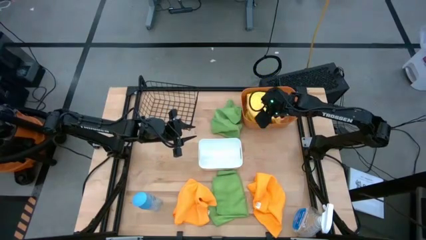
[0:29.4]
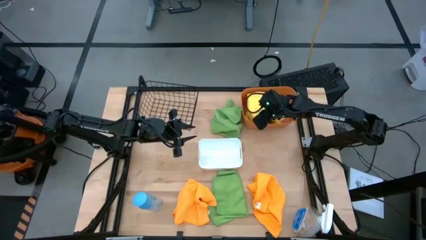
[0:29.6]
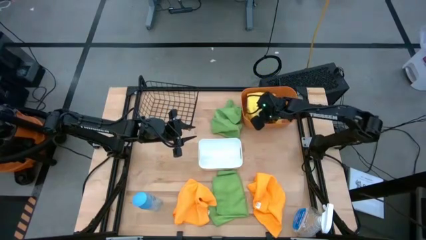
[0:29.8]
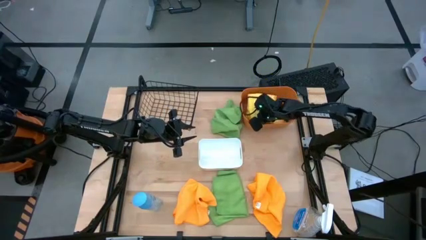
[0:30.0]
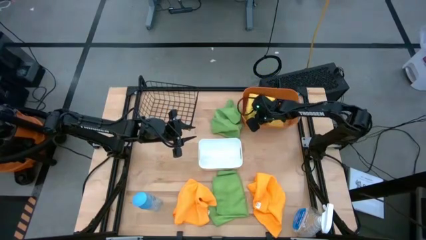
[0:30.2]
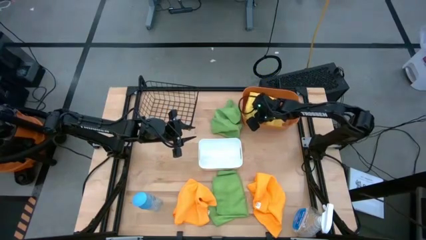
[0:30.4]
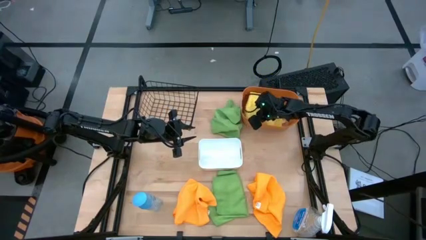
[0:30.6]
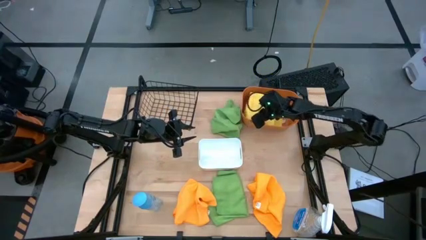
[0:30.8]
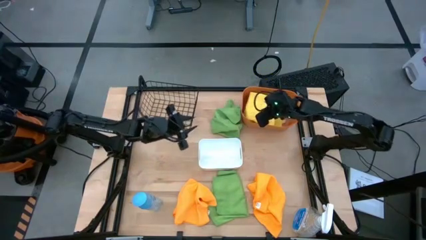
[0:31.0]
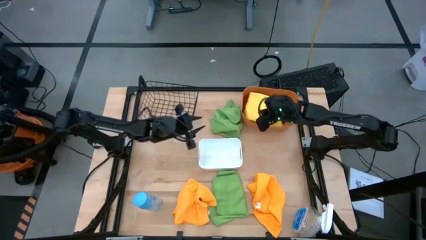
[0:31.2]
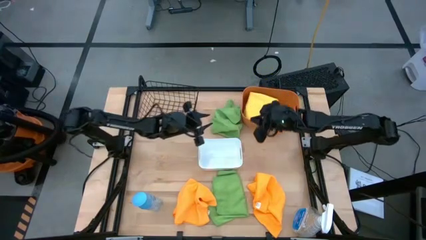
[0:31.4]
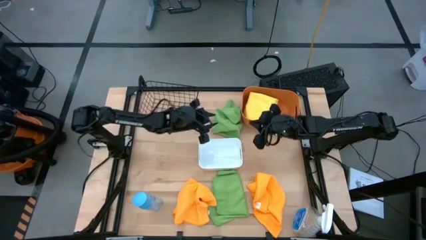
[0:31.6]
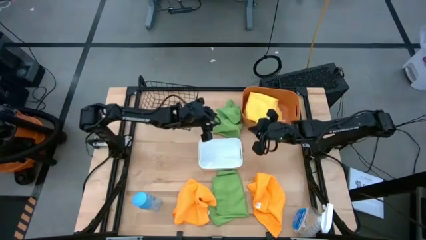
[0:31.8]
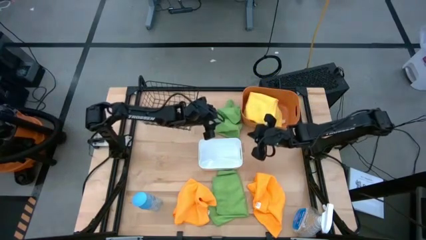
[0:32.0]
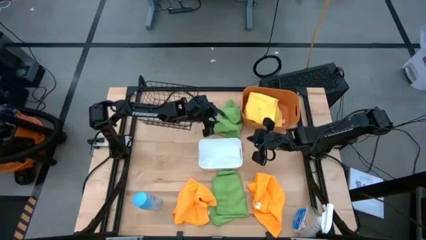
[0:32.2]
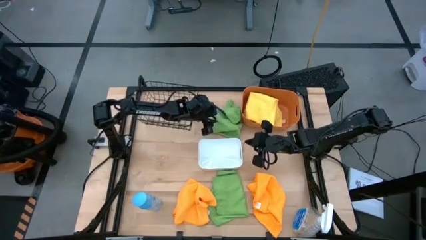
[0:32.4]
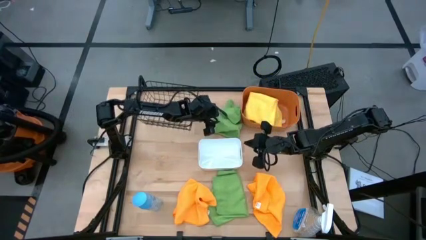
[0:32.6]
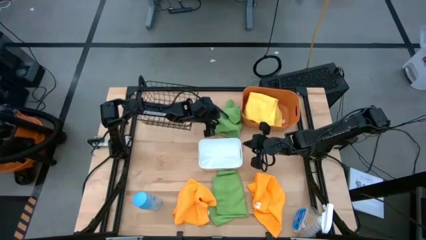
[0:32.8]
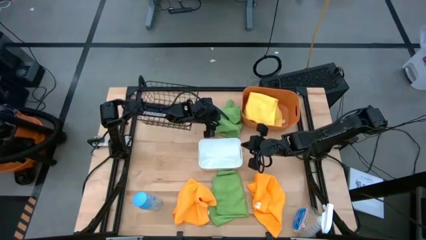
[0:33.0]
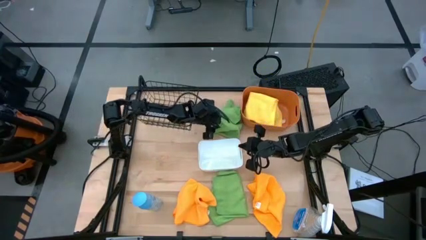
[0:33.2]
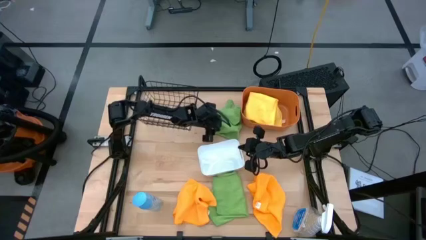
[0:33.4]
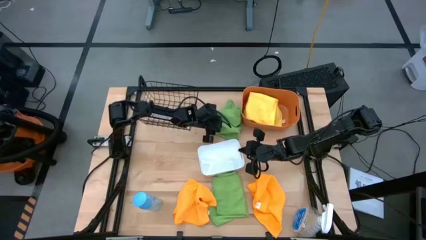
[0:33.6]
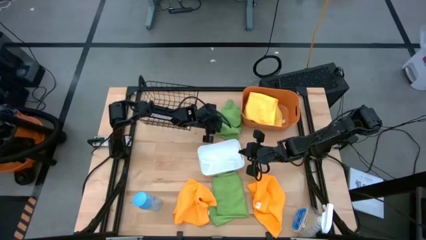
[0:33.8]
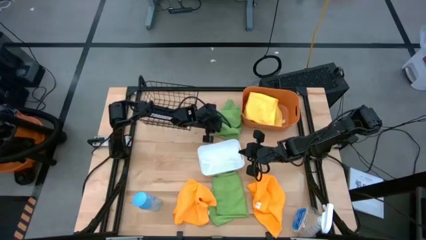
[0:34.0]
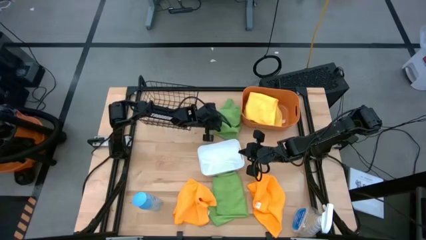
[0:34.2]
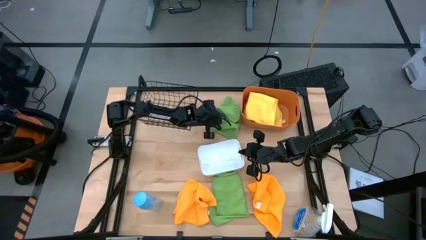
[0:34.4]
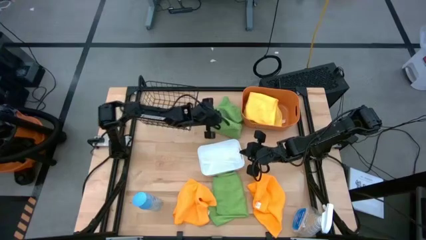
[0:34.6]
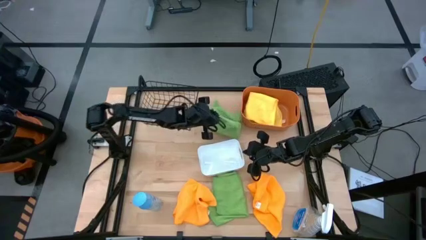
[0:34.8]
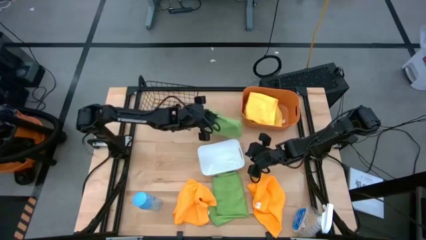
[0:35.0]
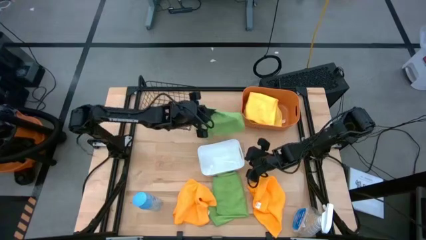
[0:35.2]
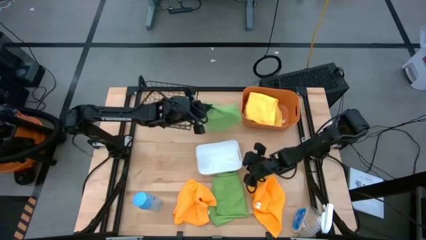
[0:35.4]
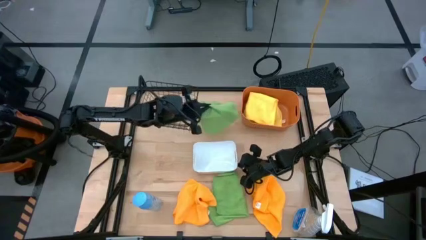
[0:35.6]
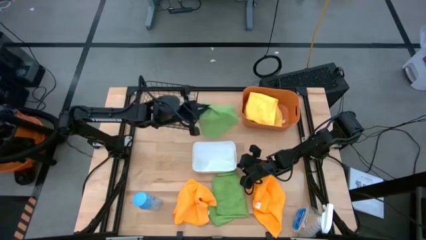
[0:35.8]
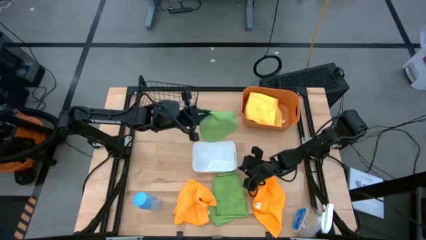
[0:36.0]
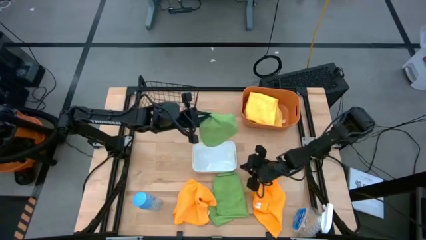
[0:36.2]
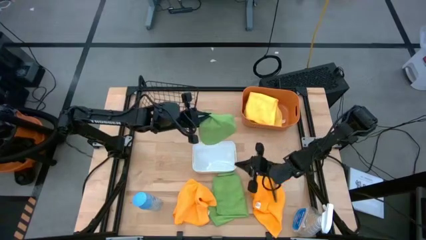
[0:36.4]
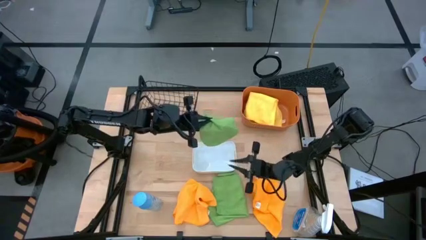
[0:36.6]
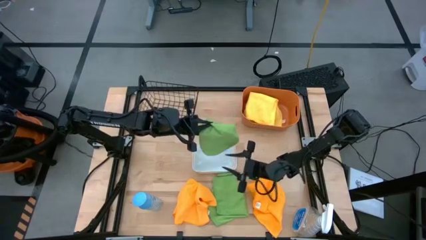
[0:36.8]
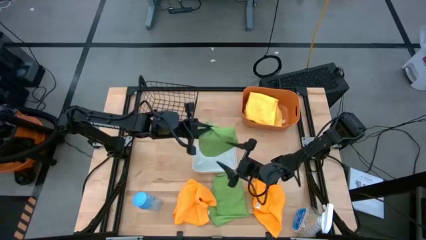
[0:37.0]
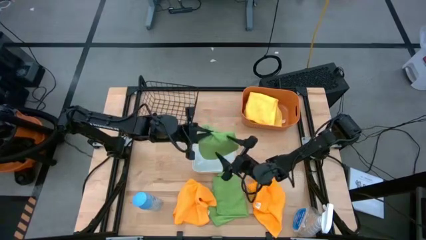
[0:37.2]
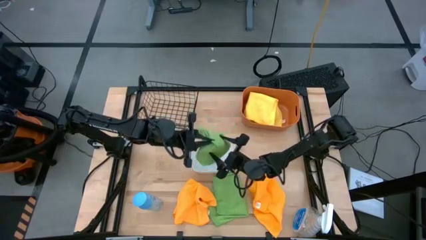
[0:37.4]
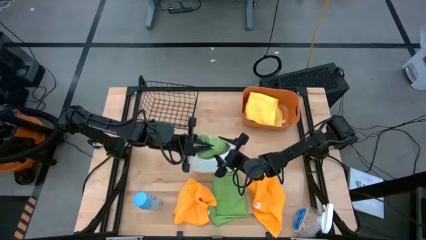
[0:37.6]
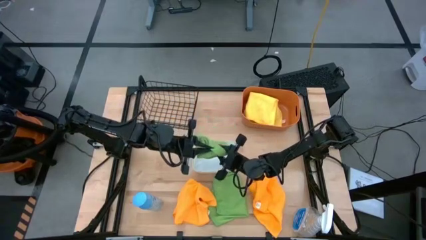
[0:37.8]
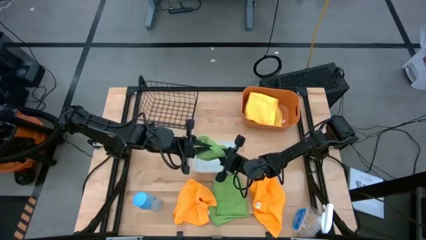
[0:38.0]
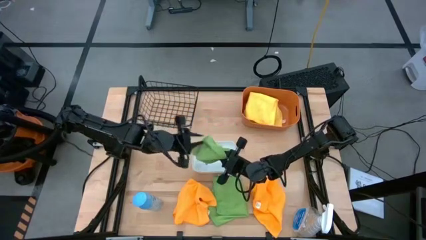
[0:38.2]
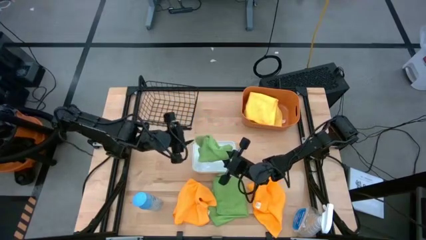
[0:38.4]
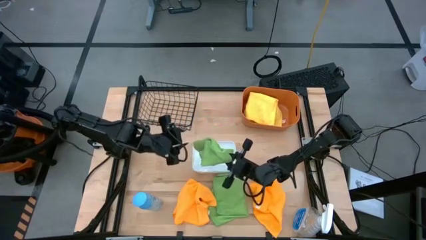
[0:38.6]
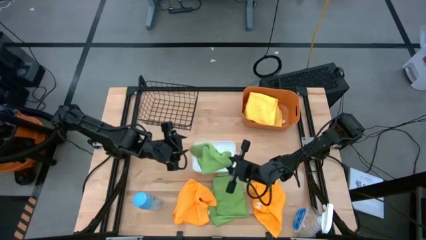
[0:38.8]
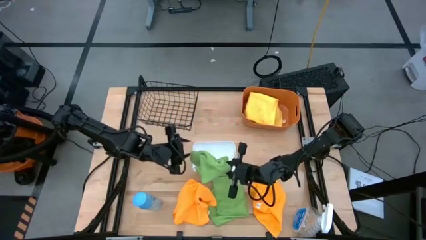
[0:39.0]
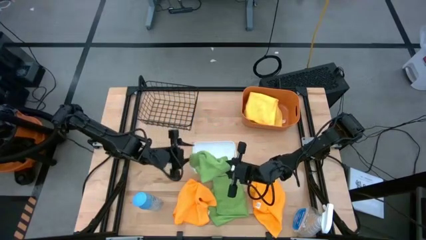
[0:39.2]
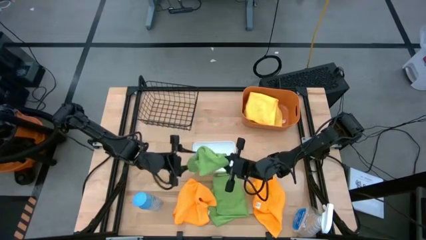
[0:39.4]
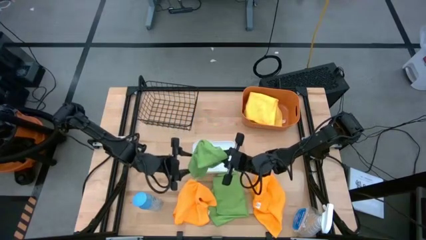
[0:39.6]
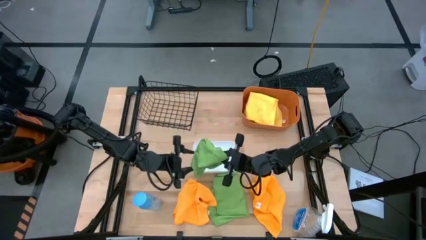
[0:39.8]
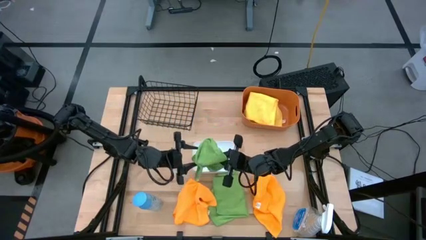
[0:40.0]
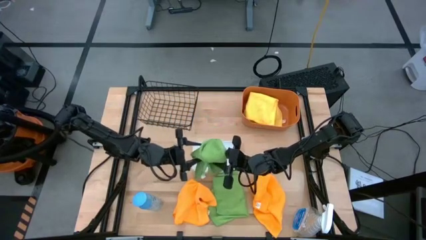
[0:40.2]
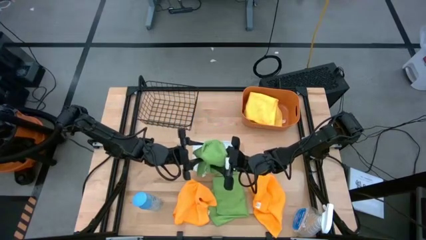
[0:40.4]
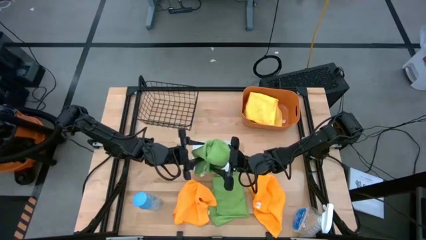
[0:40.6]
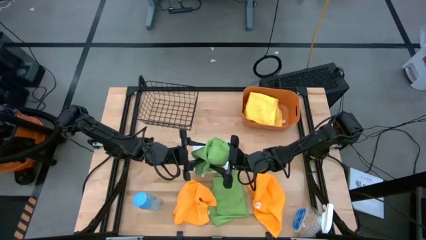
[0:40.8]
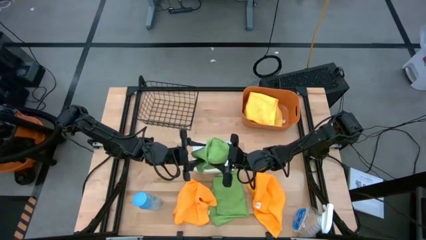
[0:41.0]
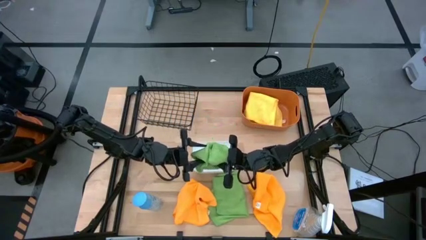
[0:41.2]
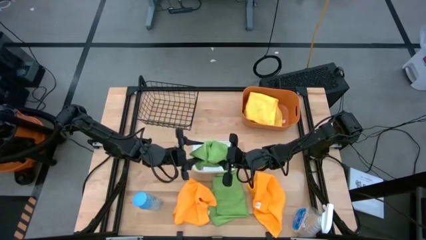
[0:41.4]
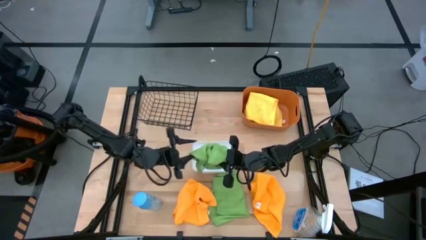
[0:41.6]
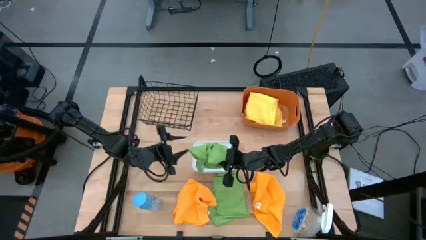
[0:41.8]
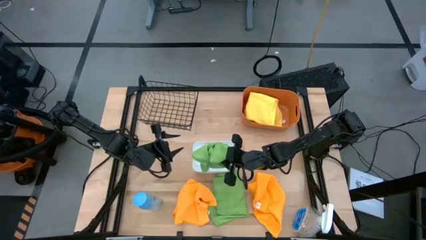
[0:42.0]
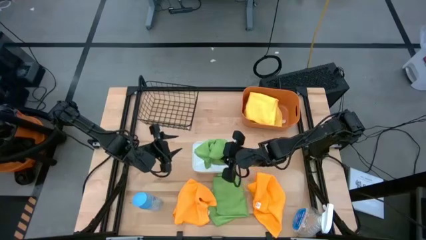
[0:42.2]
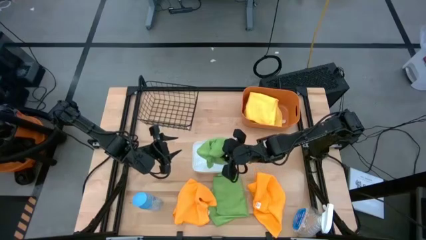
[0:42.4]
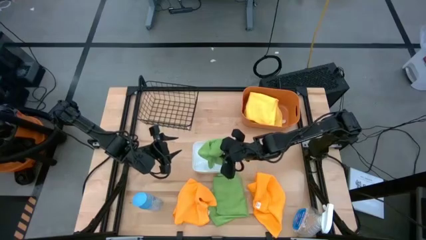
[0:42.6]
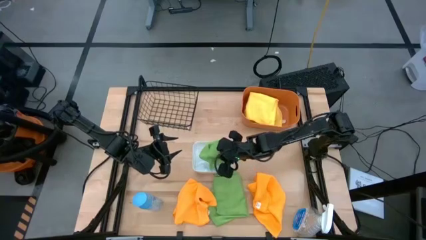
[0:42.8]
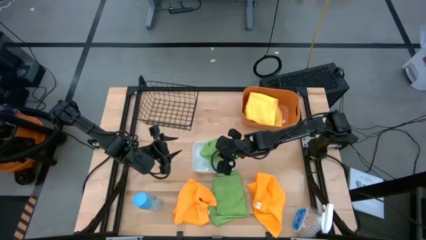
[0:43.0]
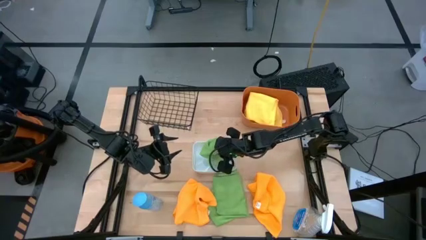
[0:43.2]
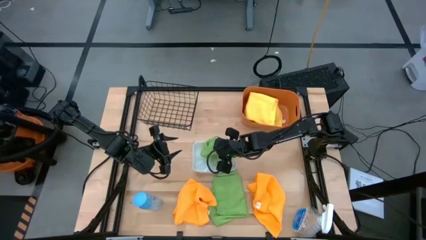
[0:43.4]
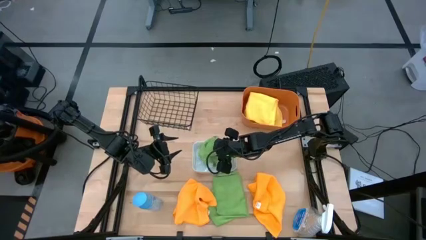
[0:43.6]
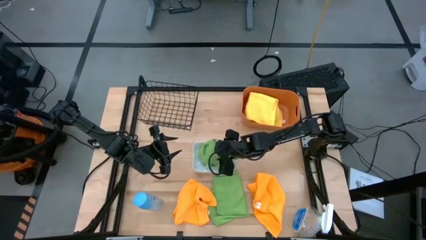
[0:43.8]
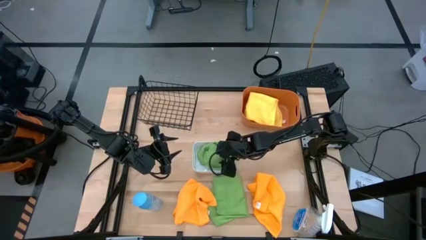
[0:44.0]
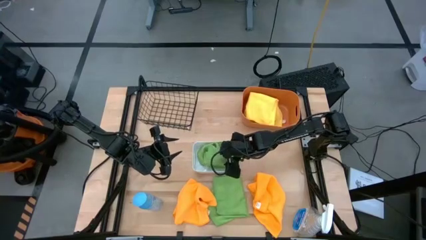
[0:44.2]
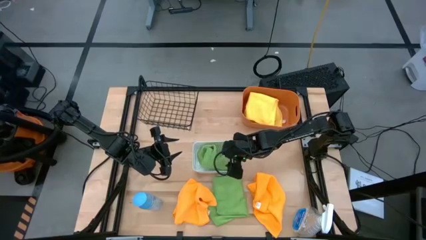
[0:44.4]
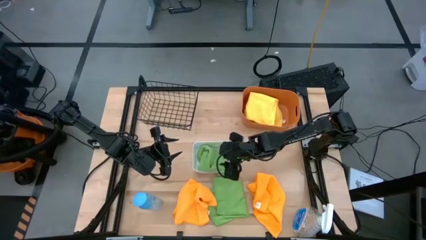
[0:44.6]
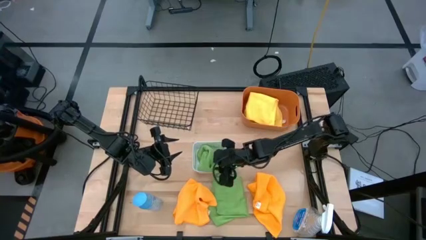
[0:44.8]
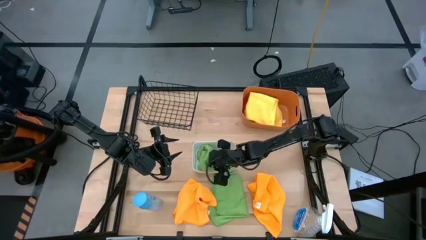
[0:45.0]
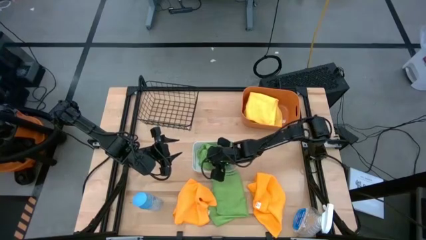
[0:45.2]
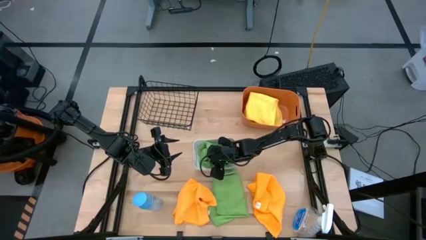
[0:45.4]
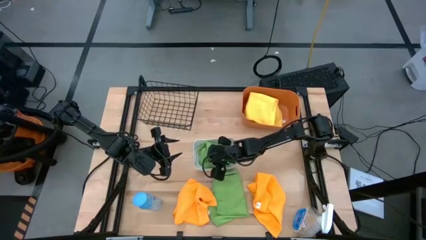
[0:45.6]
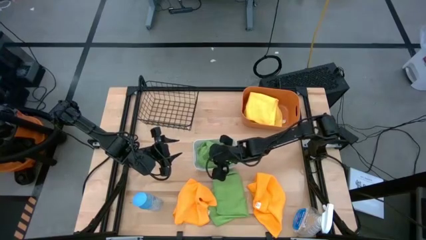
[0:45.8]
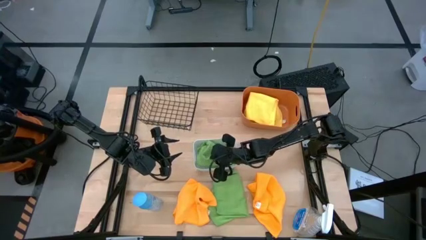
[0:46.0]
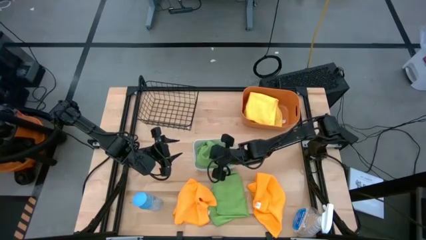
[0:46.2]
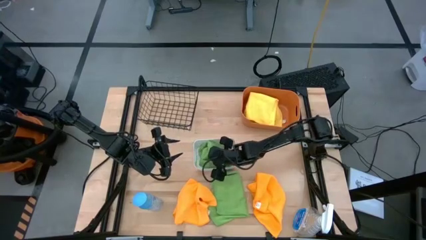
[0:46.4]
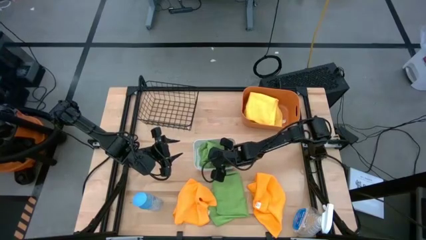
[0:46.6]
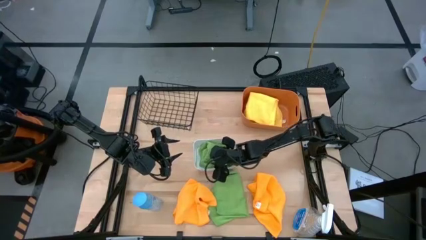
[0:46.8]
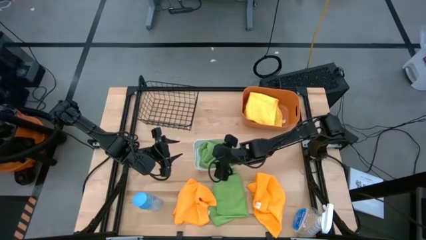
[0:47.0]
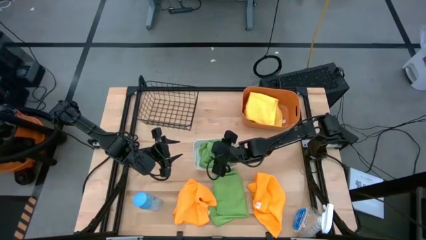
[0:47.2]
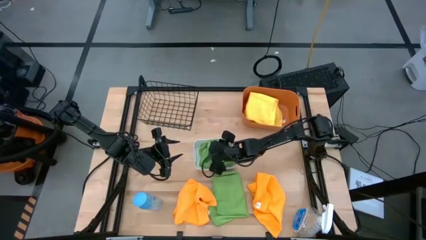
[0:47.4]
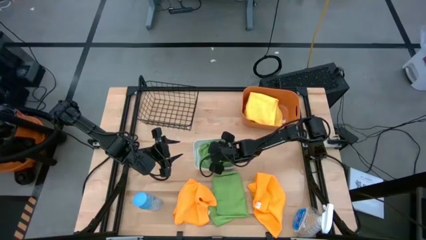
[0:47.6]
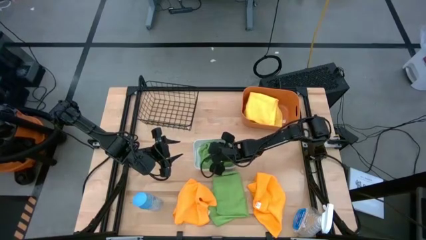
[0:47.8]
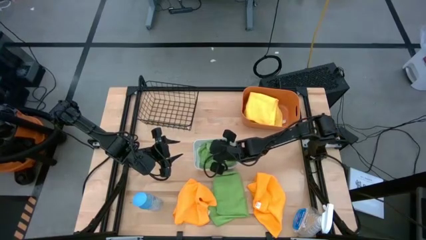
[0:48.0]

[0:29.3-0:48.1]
Task: Sort microfiber towel by color & place in baskets
Put the top green microfiber cloth into the white bin
